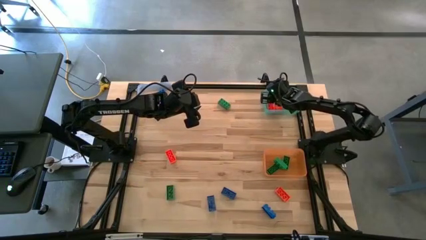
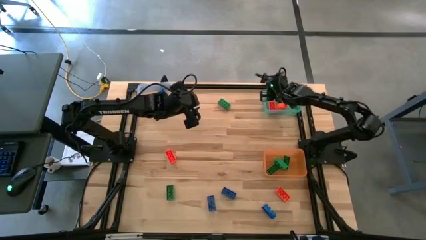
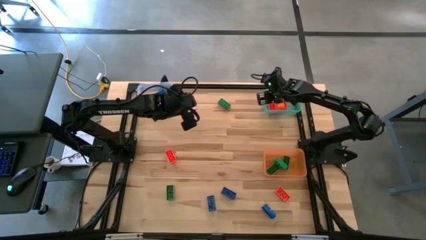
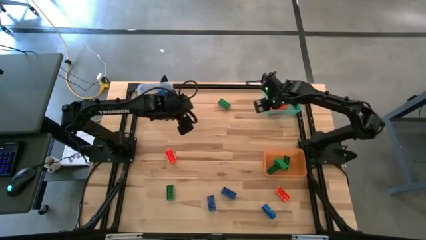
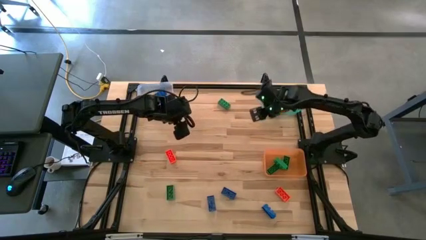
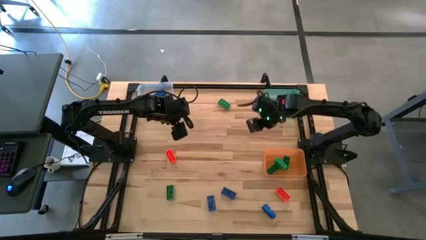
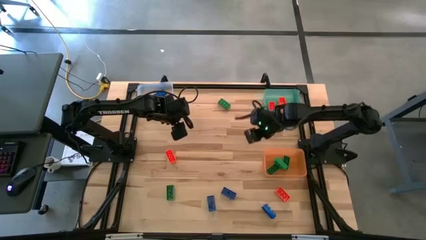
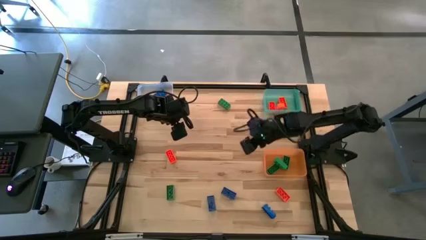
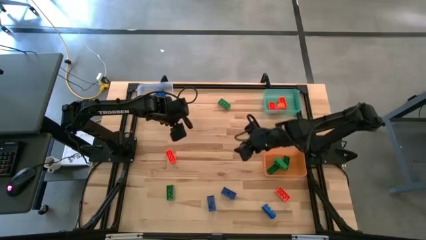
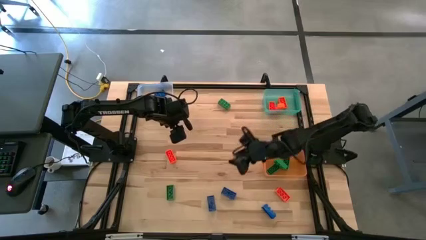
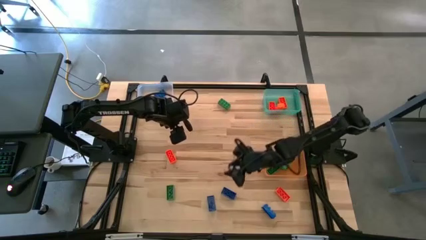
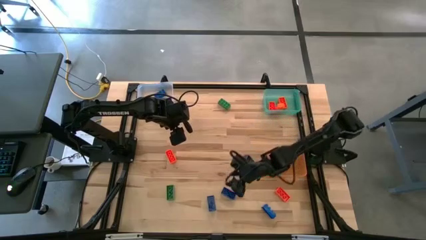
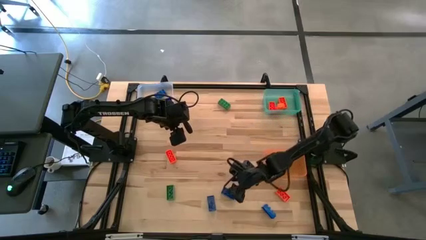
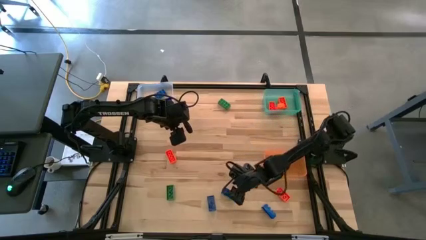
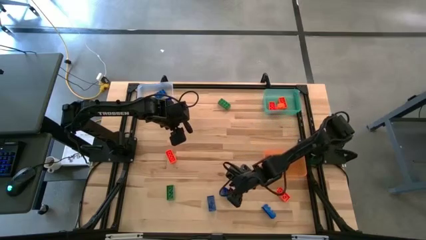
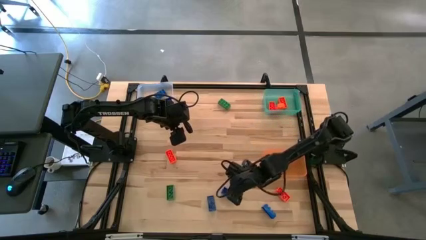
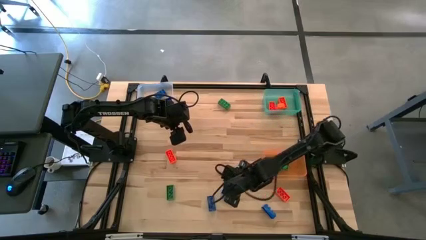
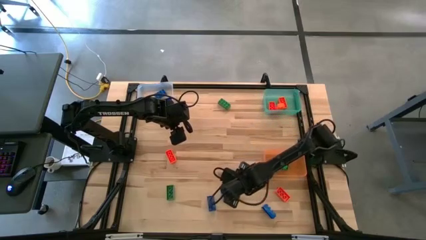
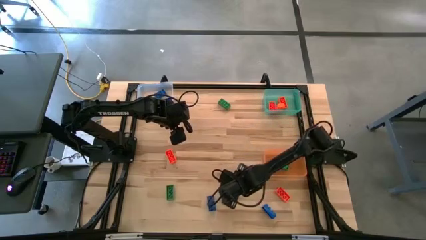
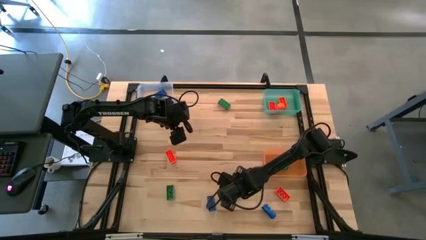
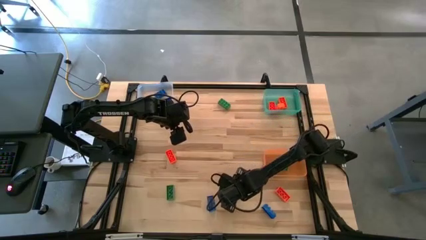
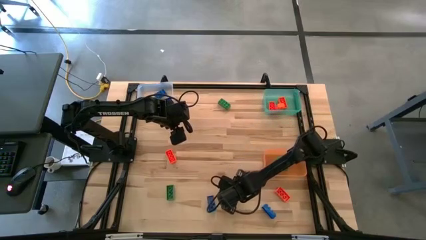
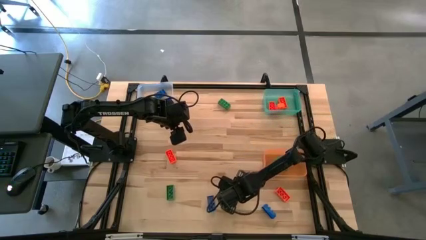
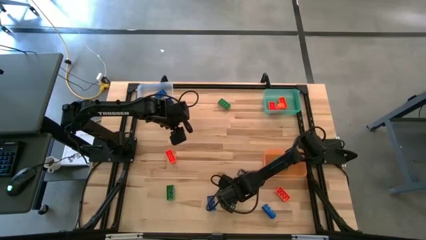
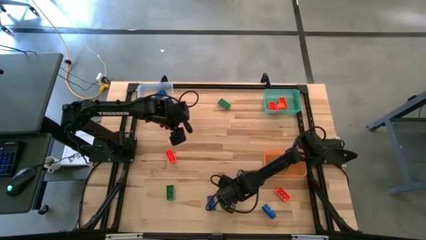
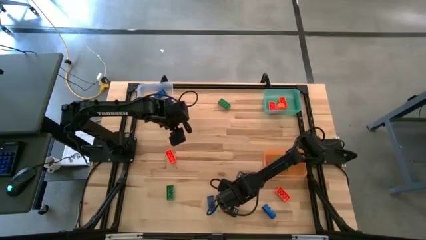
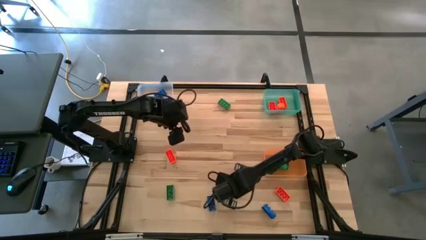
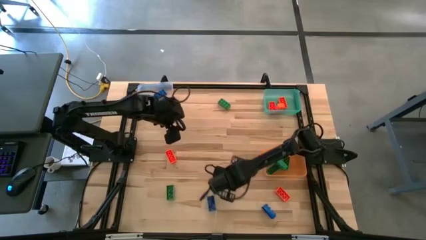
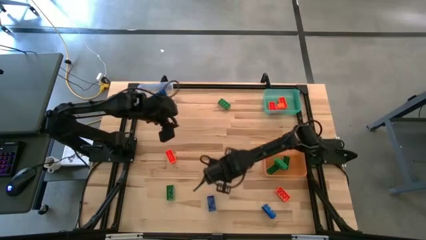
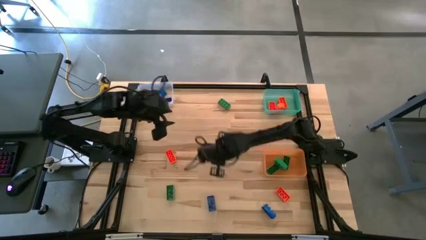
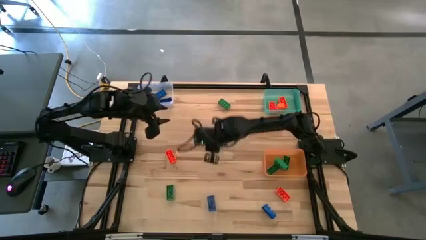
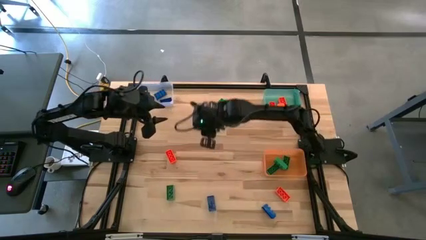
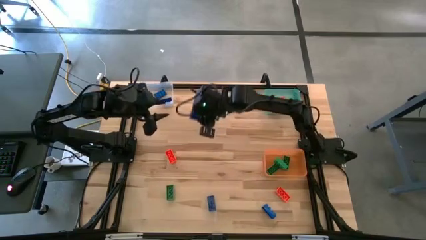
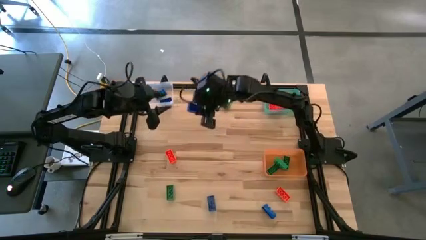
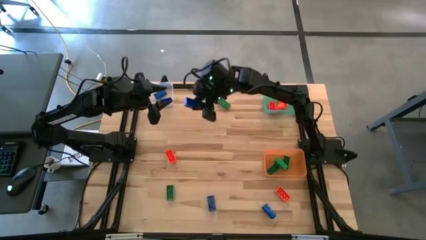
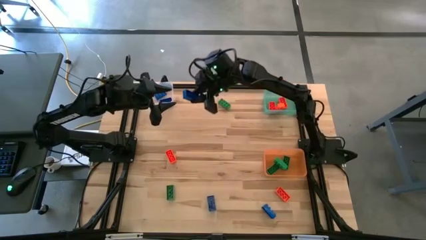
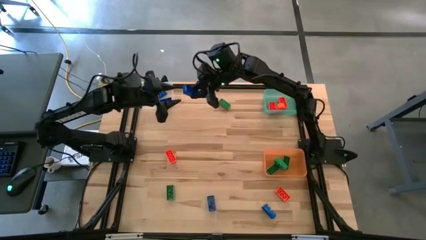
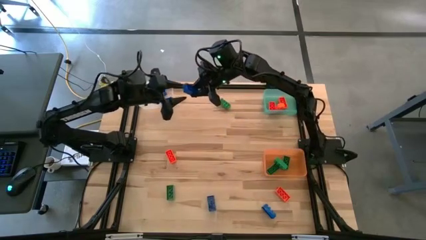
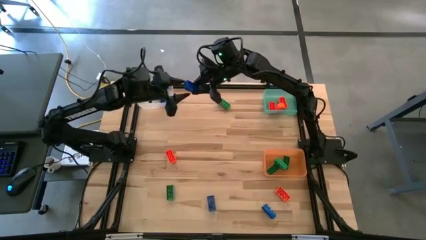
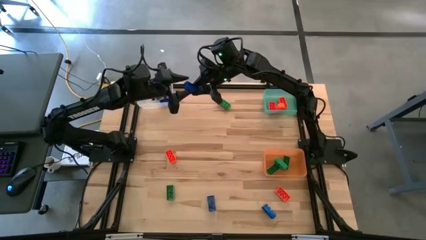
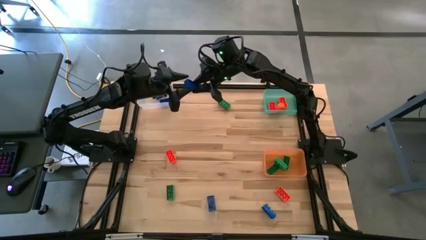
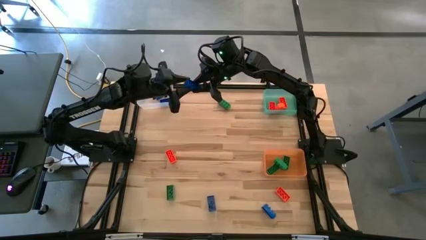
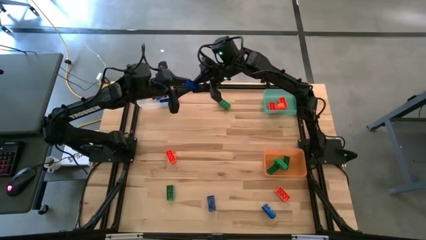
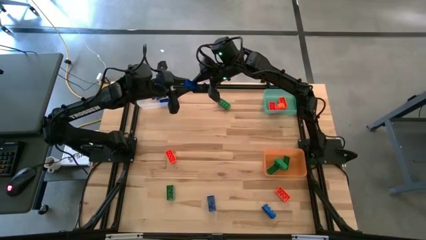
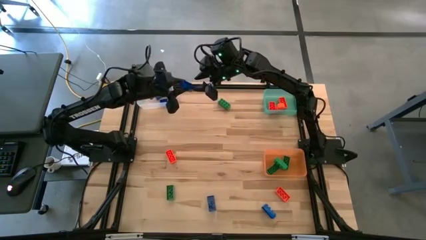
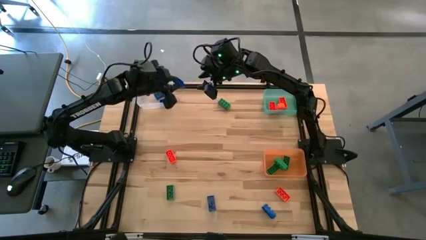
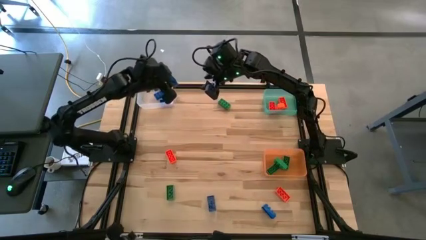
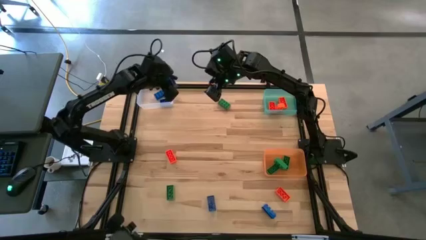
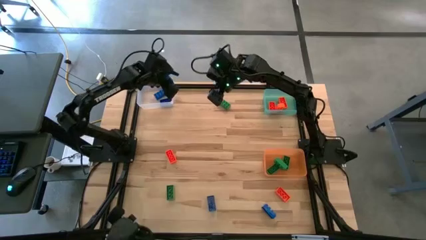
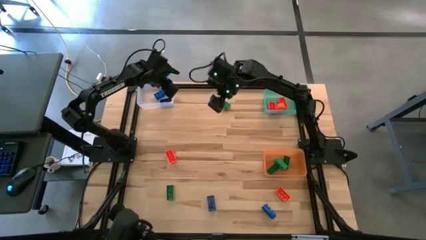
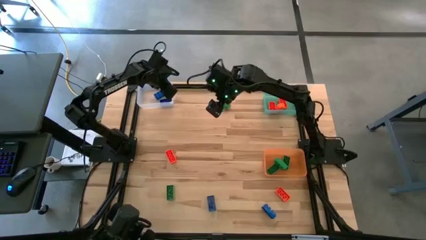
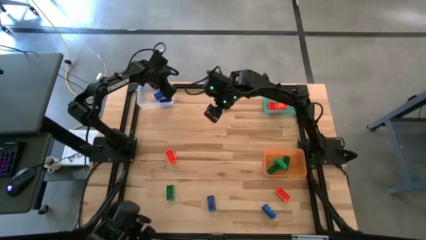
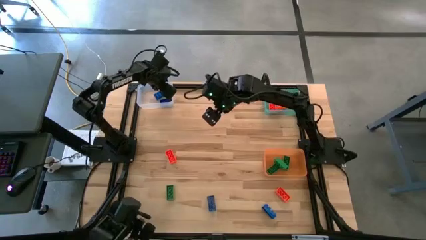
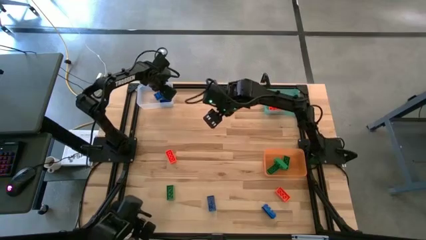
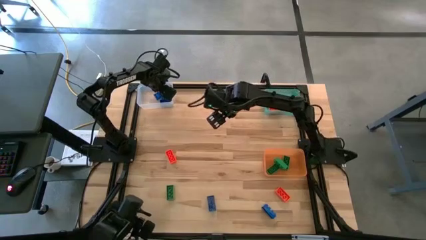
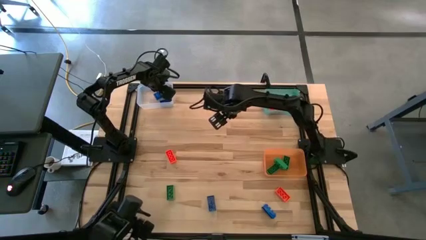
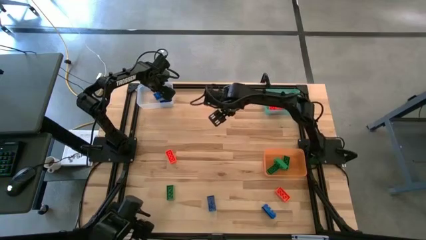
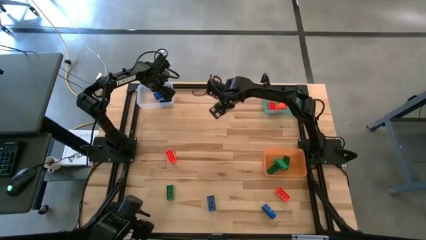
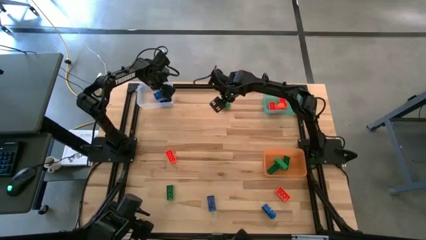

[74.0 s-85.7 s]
Task: Sort & place blocks by color
Put the blue game piece into the transparent bin

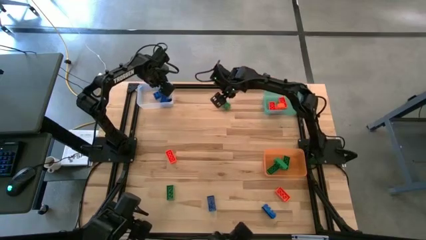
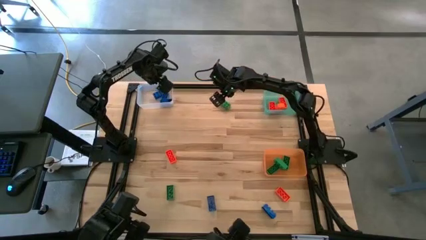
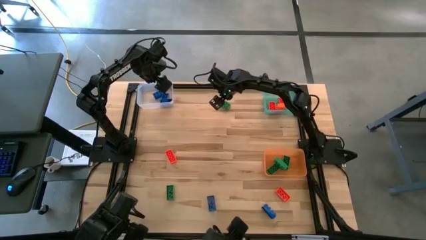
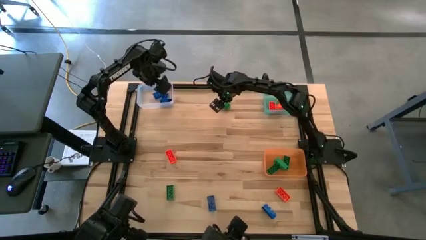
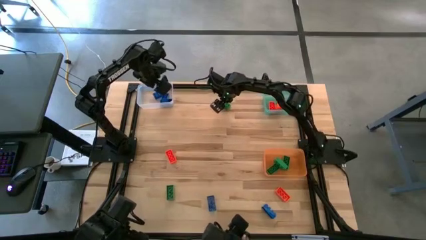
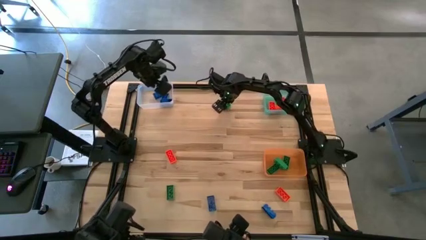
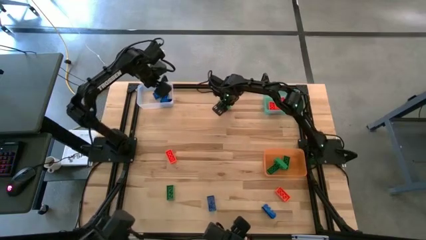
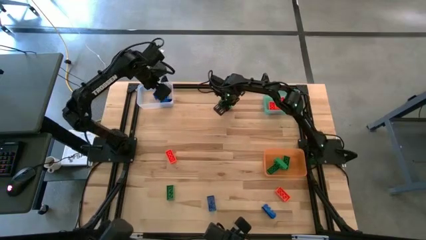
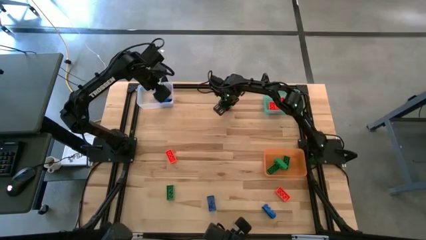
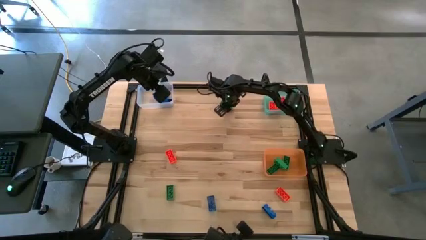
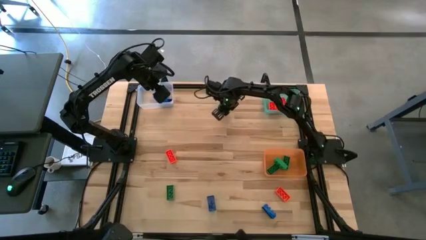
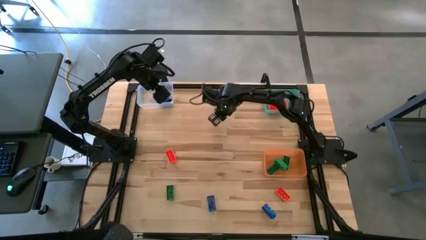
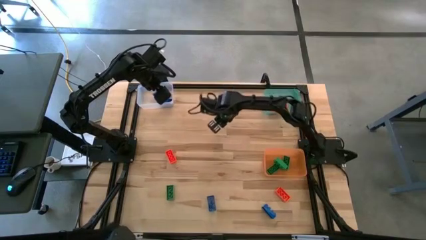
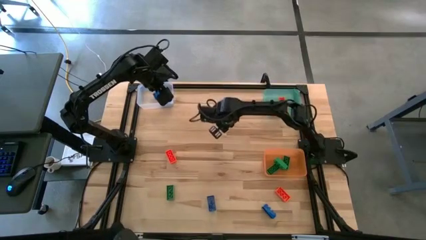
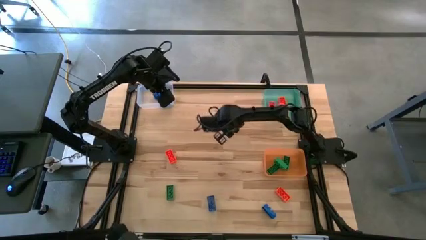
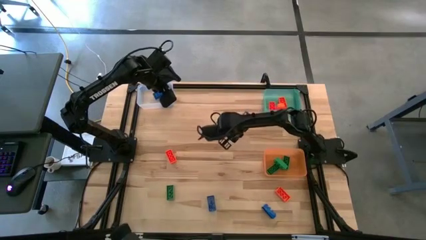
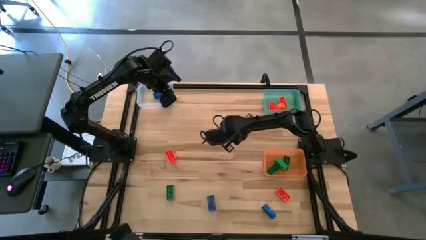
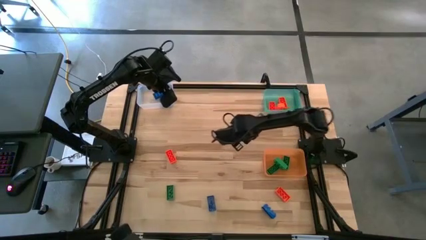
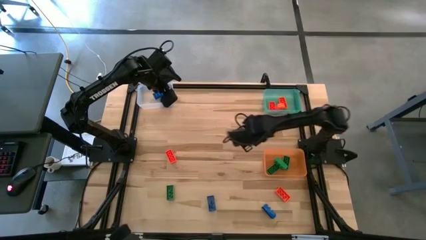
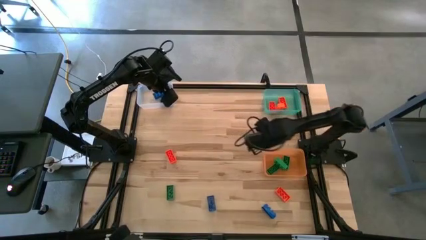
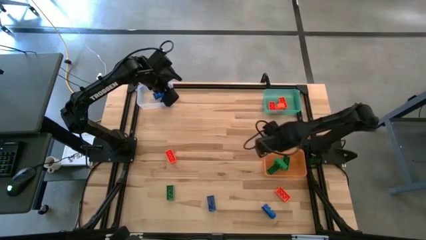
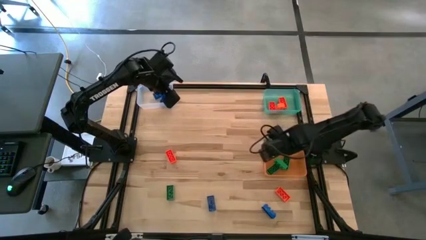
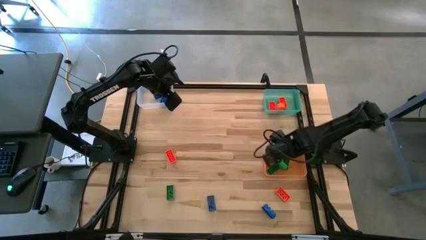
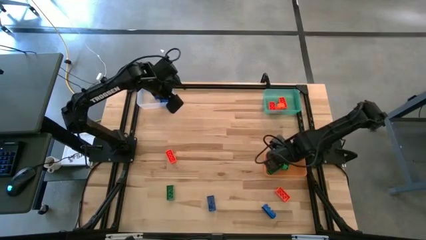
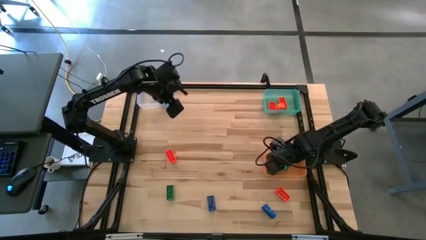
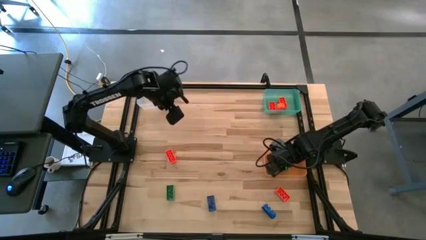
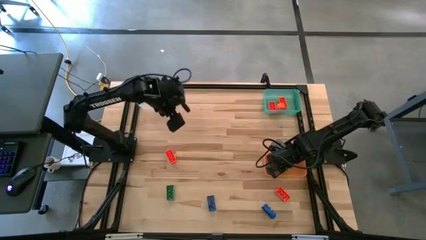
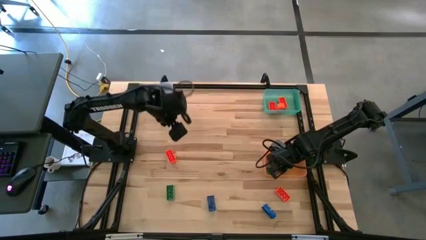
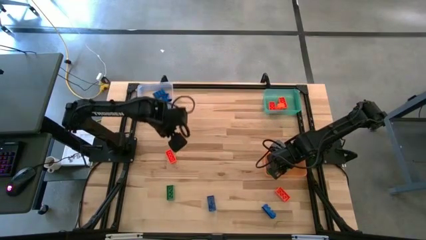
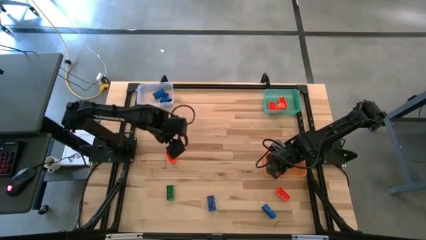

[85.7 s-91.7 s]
Put the green game piece into the orange bin
